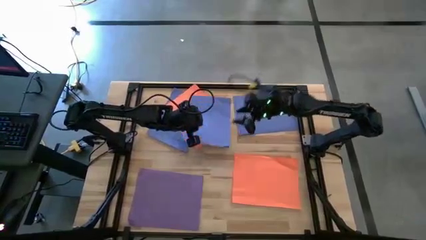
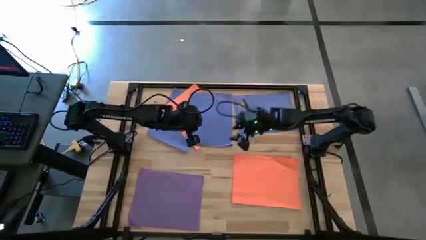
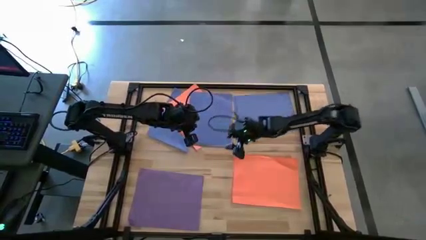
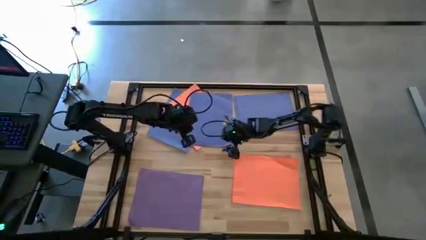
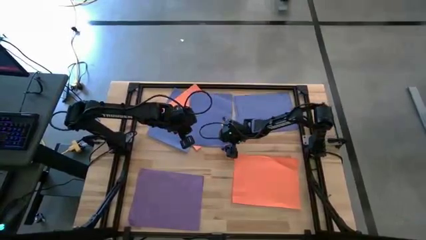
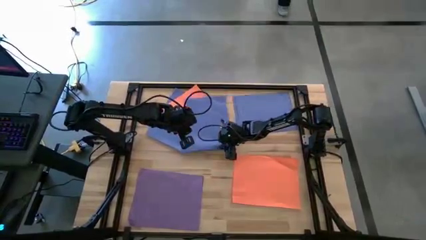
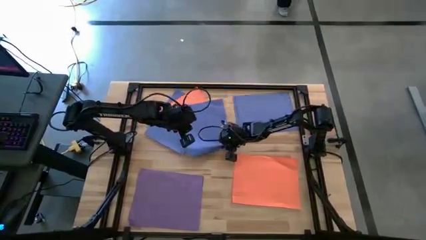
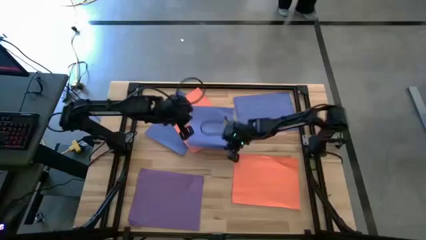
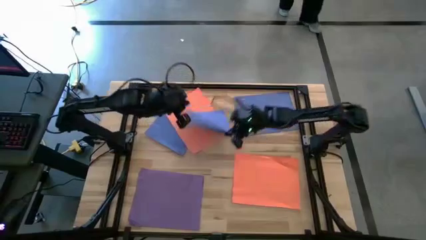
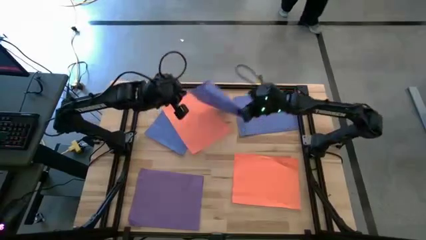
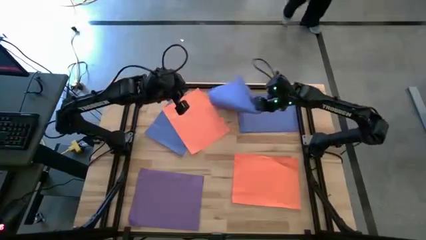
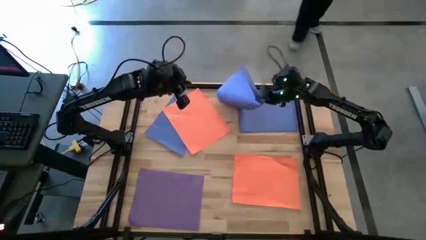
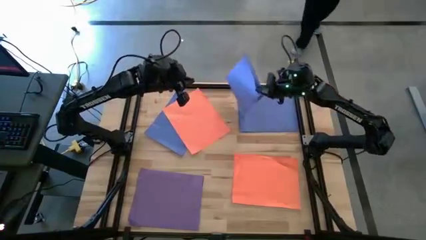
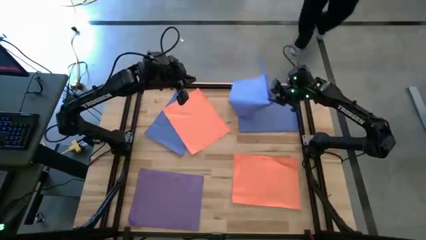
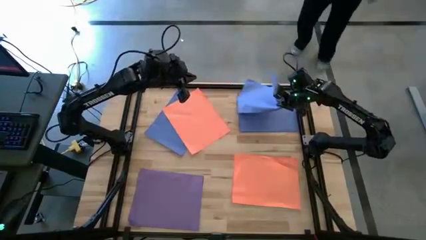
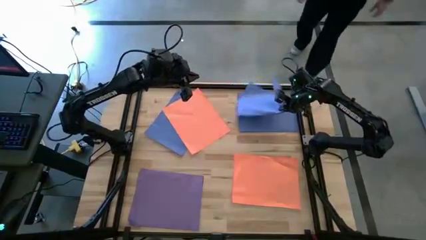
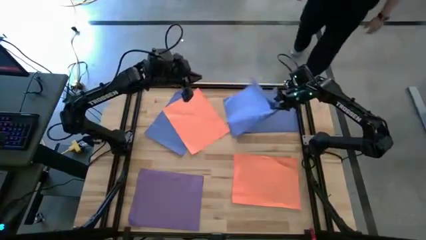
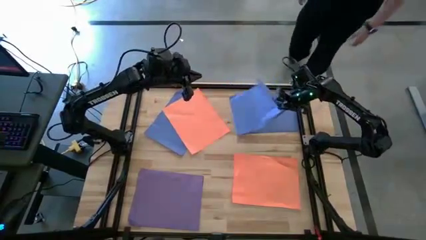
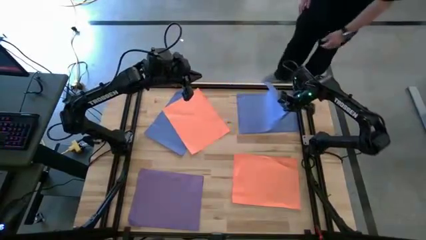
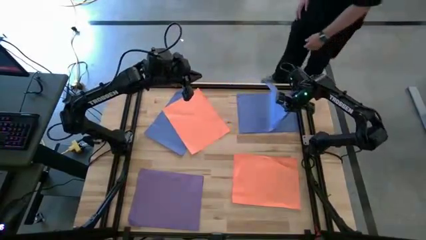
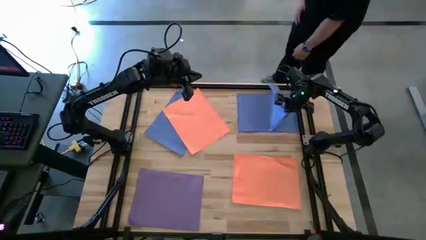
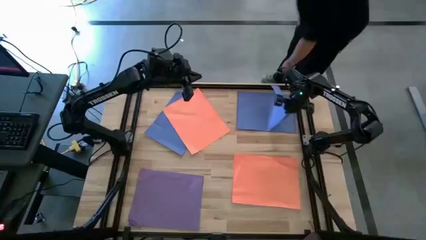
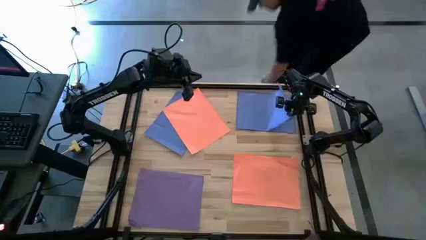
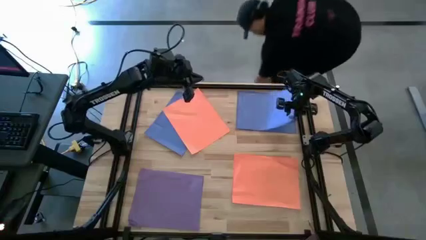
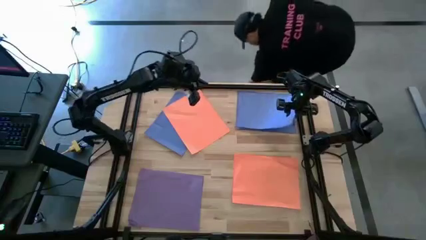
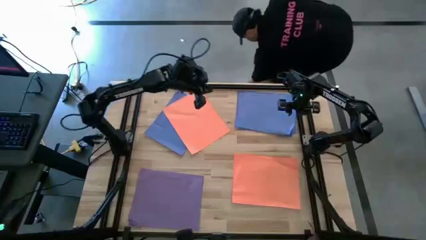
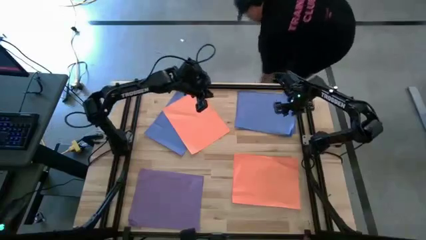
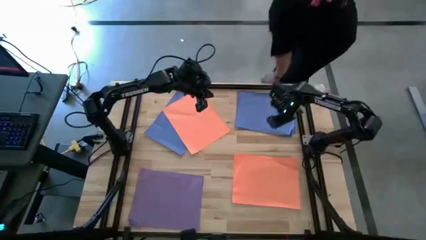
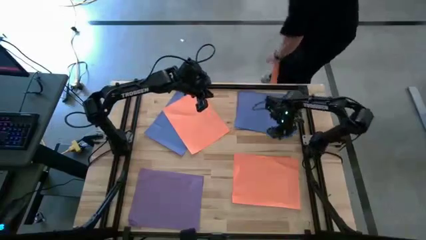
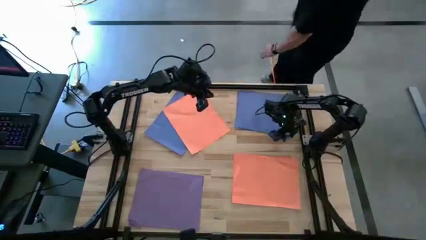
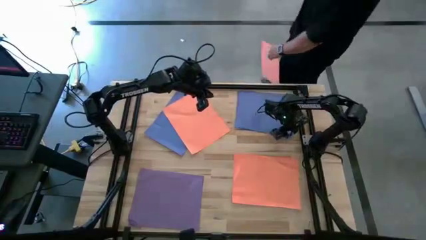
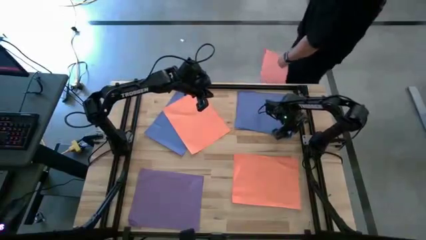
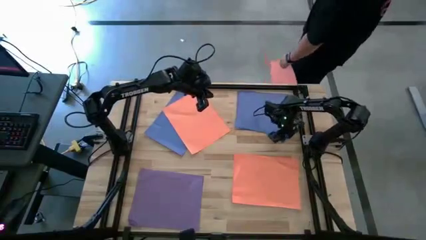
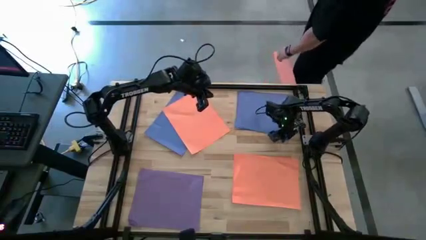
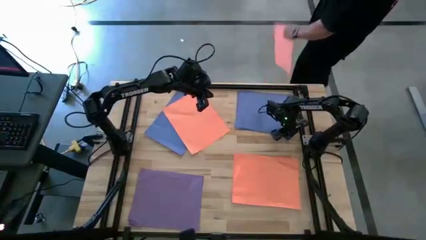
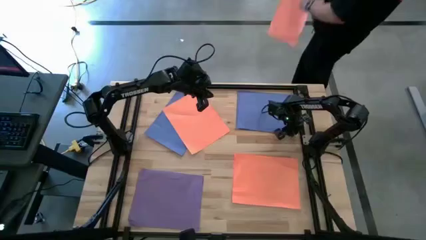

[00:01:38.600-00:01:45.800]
Task: Organize paper
Stack the blue colored paper on top of the blue colored paper

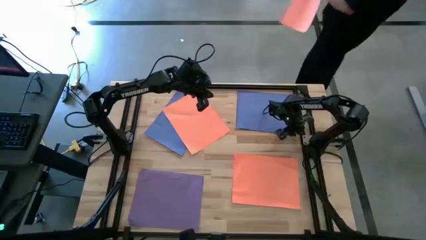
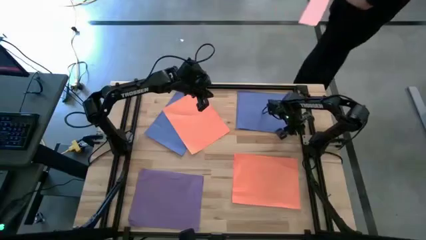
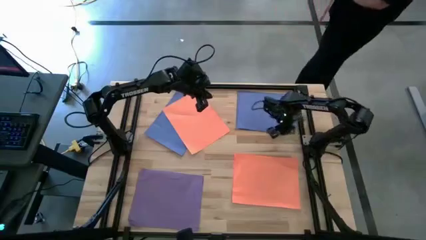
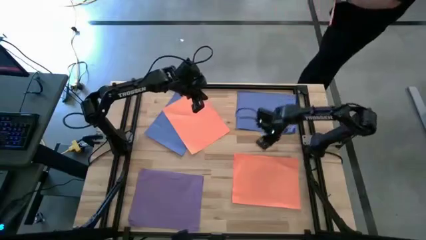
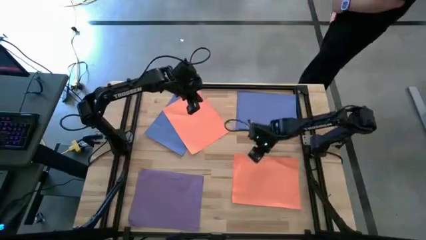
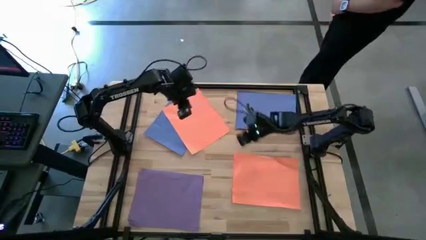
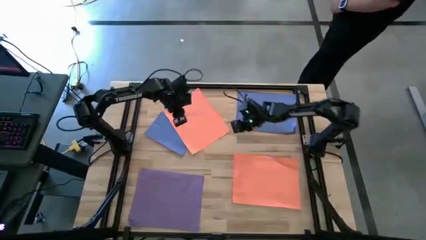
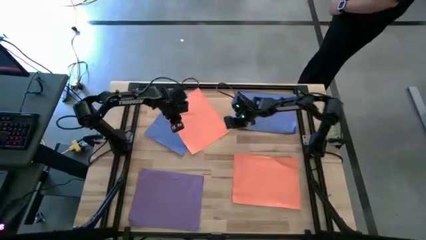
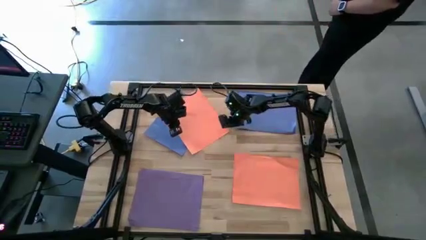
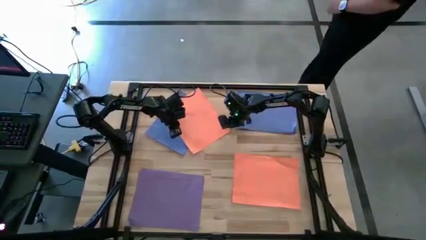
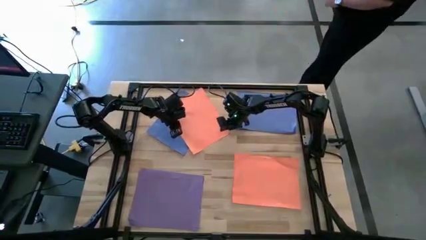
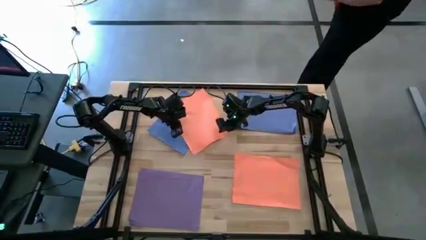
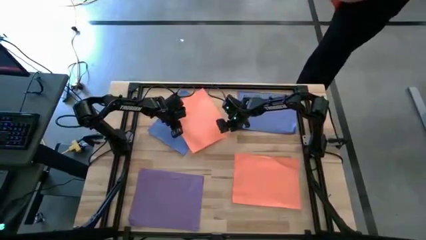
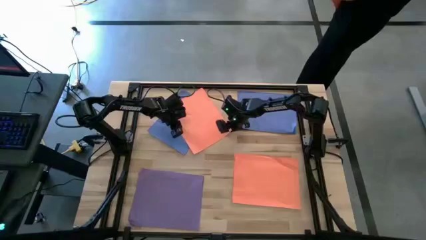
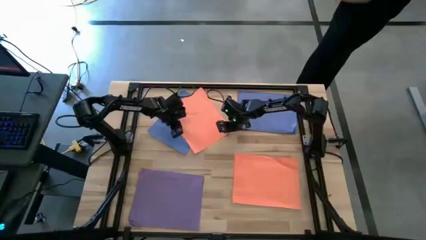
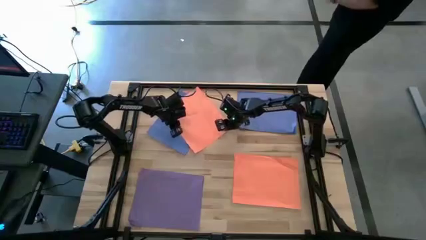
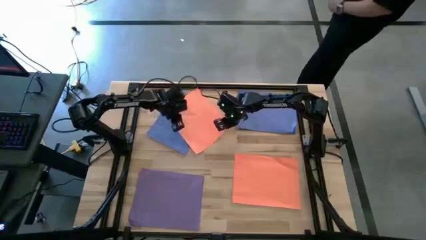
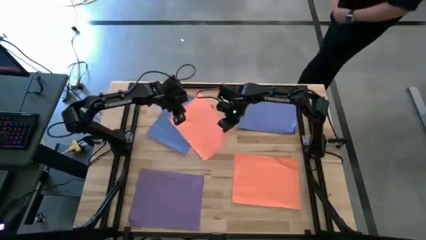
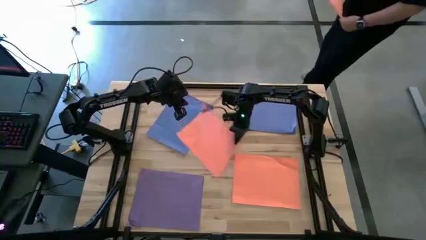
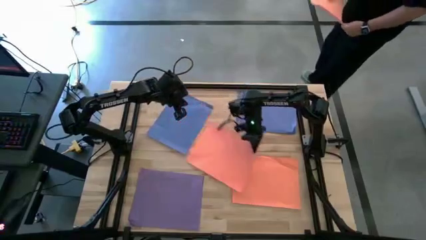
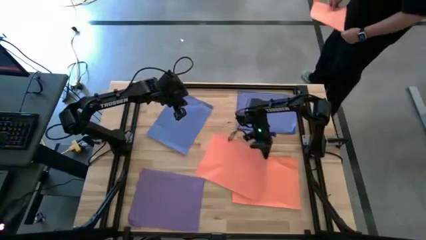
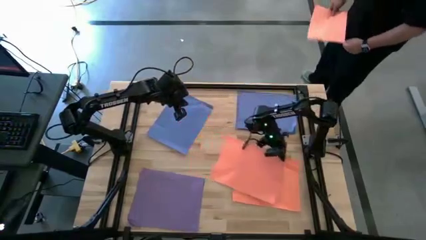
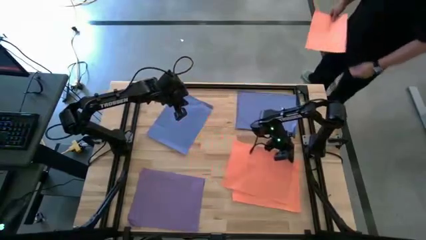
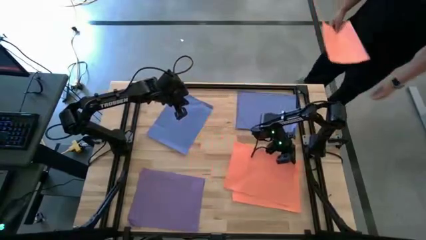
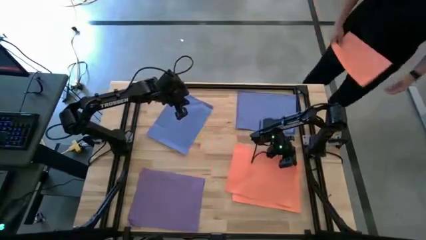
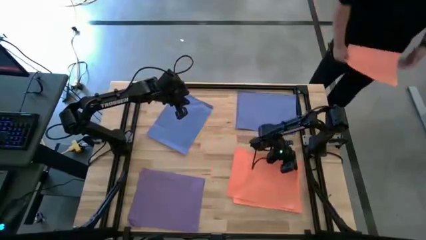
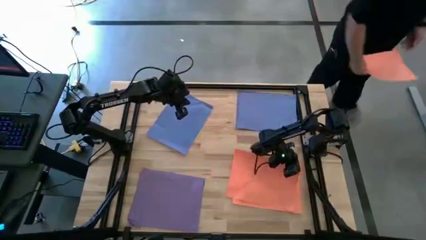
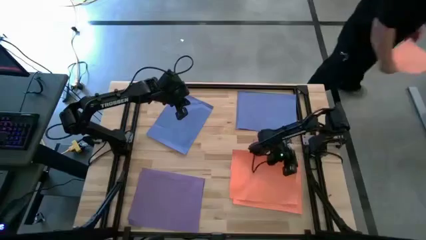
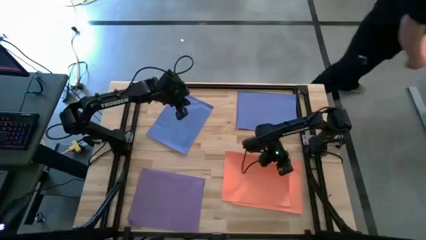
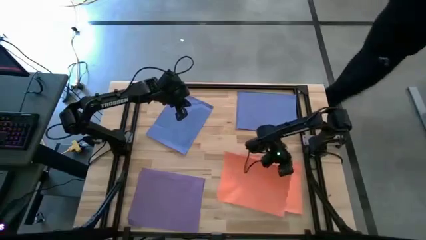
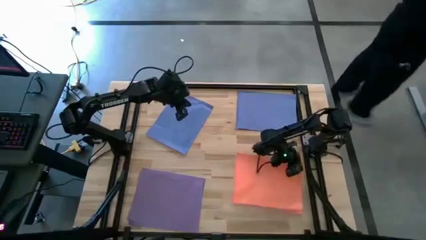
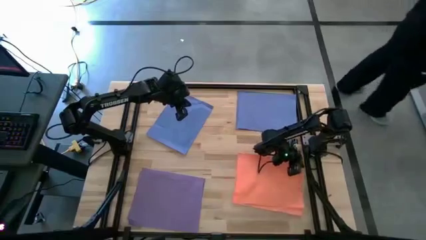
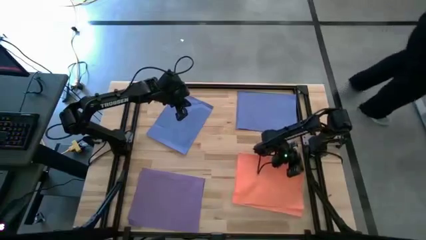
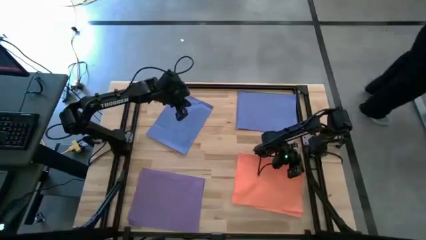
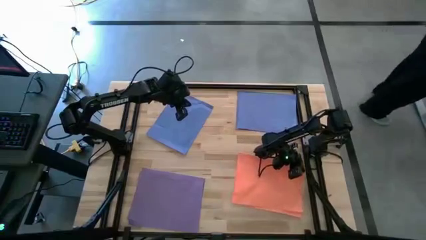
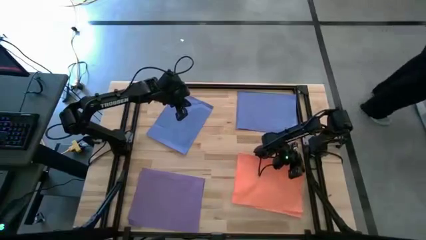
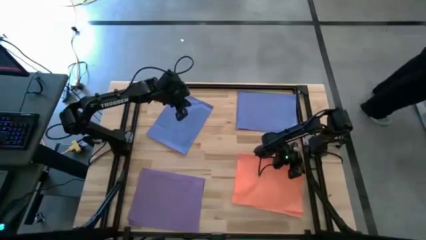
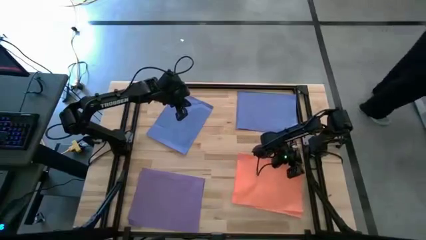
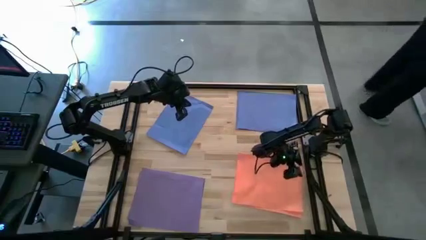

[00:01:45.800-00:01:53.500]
Stack the orange colored paper on top of the orange colored paper

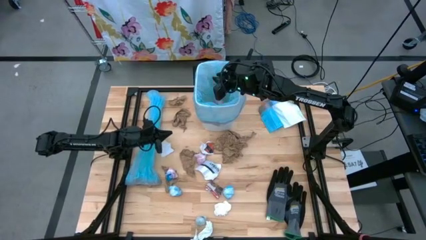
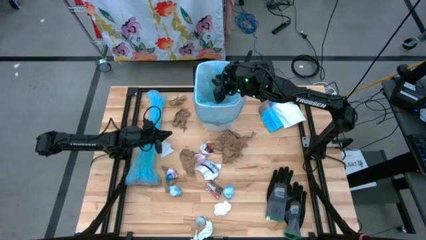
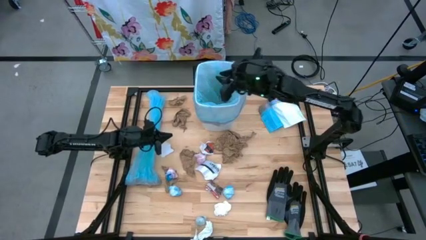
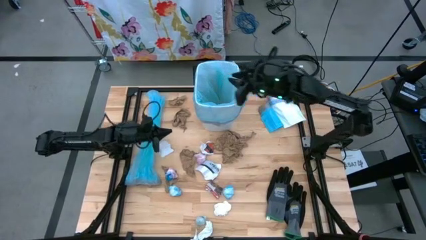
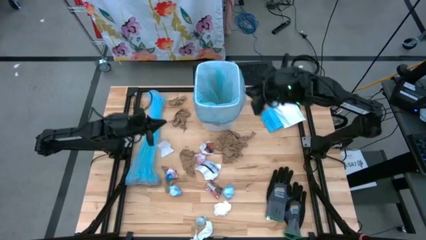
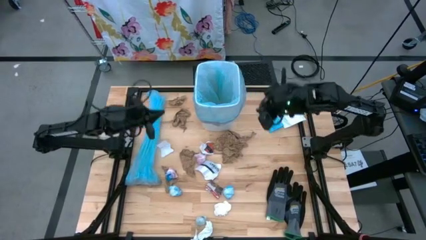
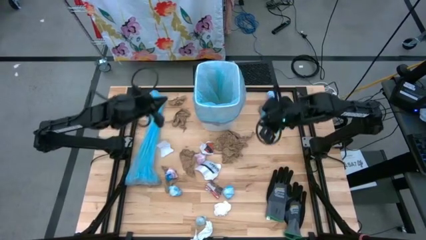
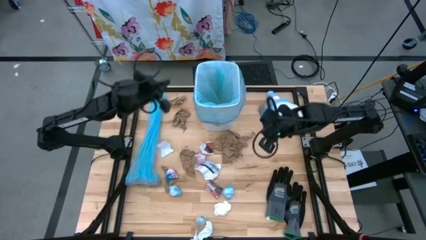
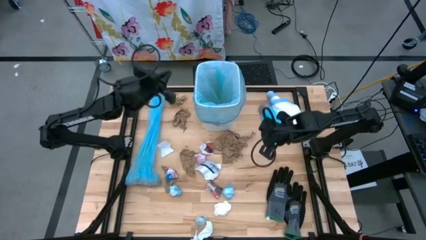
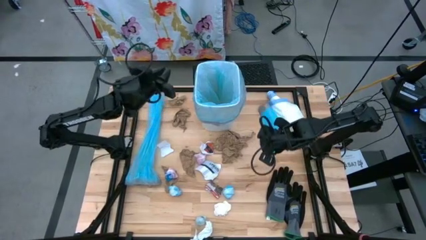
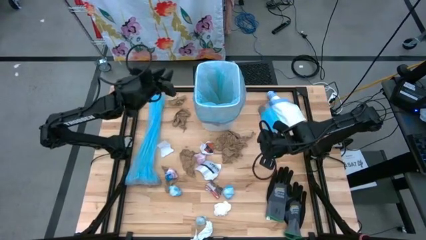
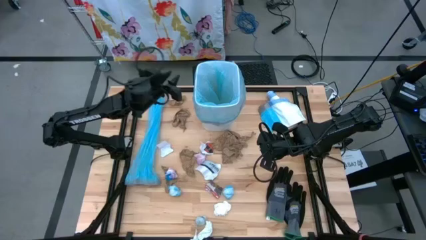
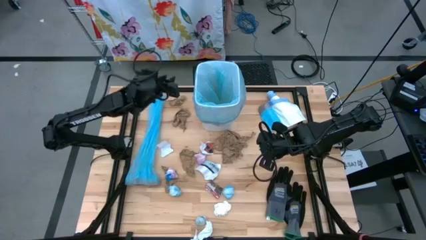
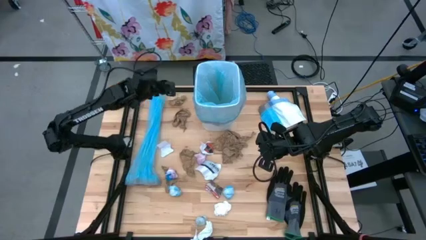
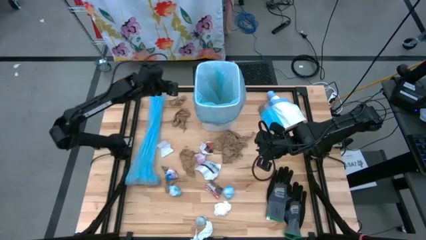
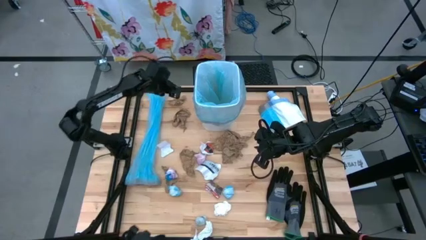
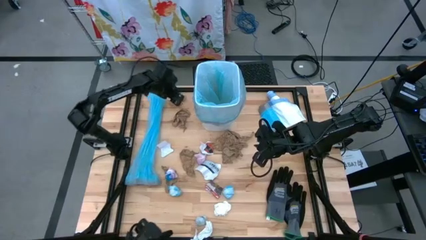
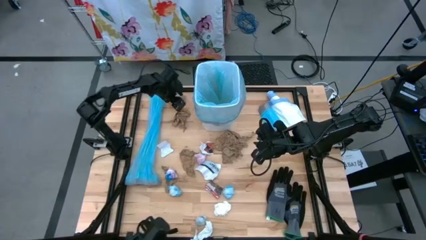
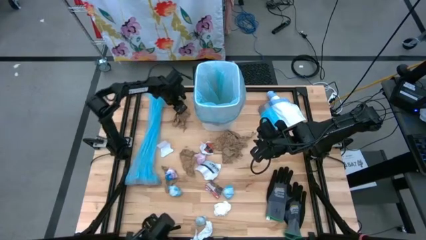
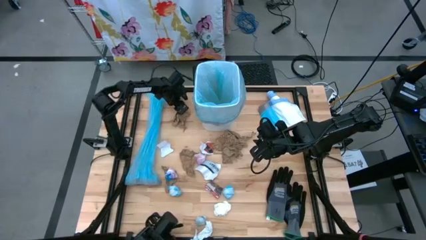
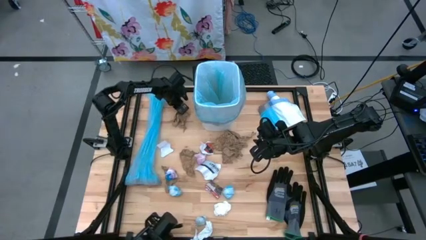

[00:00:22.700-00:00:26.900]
Task: place trash/remove bag and relplace
Put the brown paper into the blue trash bag inside the white trash bin
